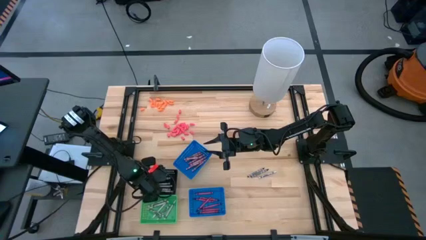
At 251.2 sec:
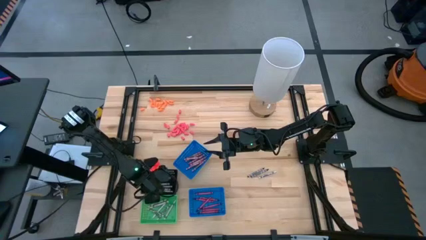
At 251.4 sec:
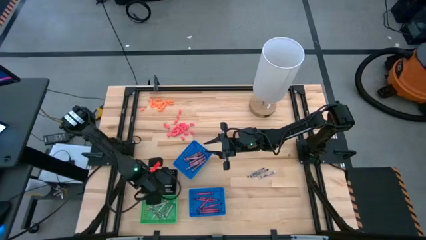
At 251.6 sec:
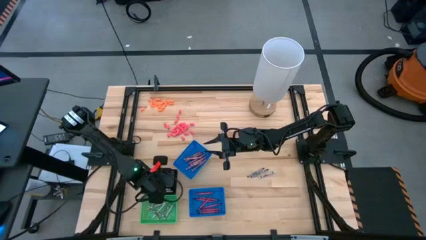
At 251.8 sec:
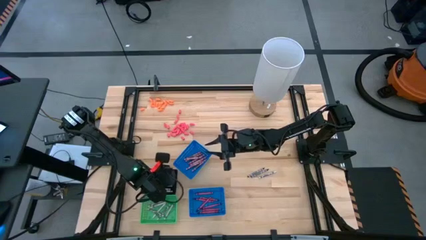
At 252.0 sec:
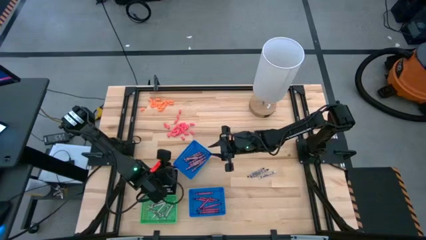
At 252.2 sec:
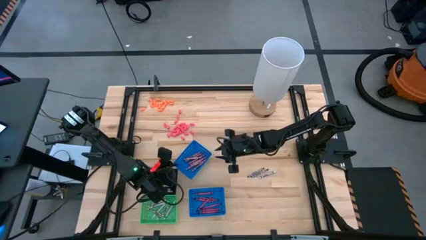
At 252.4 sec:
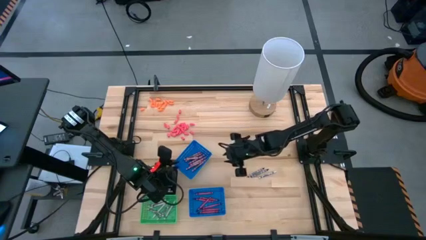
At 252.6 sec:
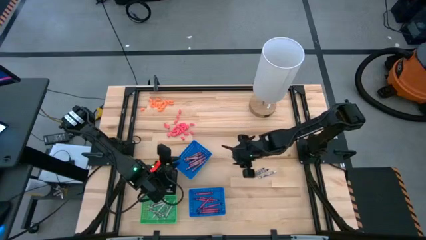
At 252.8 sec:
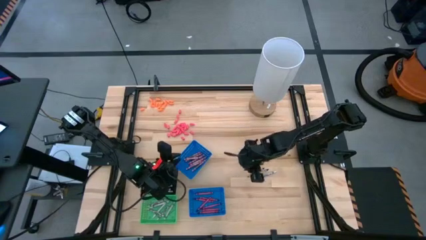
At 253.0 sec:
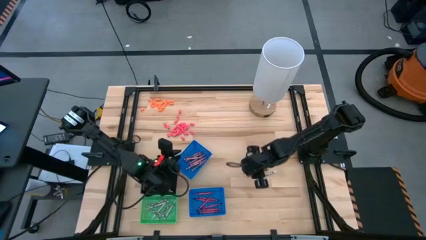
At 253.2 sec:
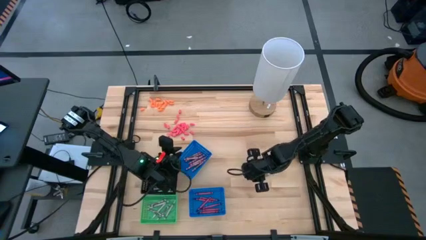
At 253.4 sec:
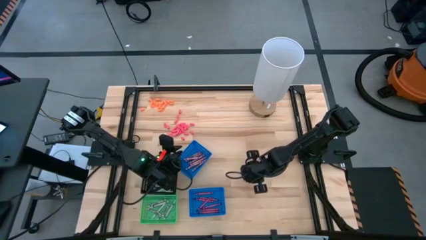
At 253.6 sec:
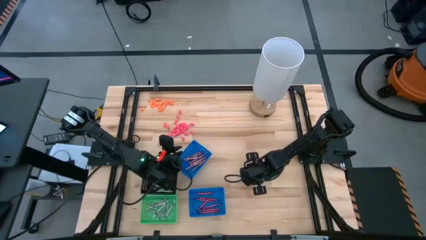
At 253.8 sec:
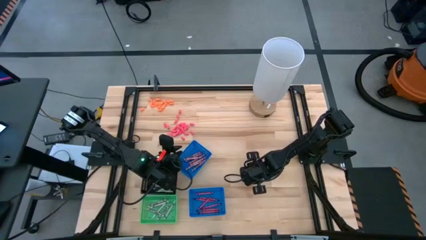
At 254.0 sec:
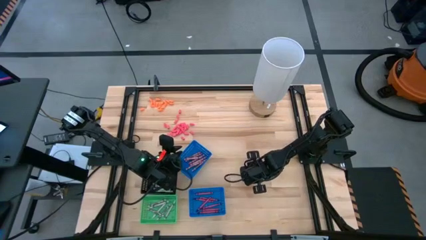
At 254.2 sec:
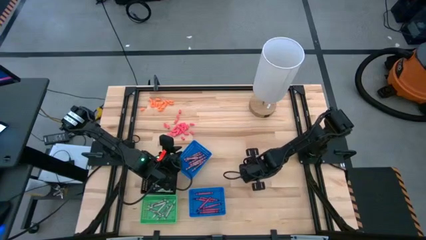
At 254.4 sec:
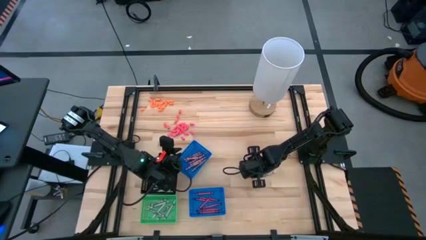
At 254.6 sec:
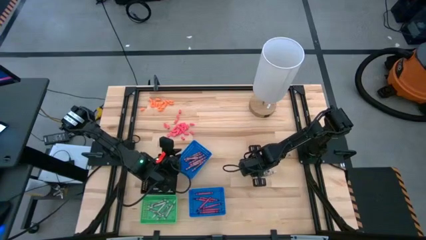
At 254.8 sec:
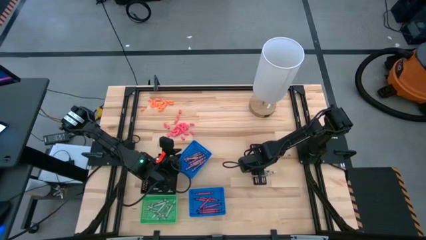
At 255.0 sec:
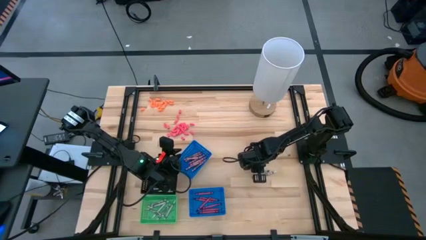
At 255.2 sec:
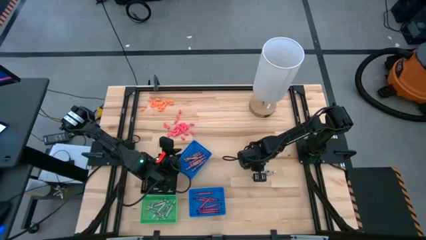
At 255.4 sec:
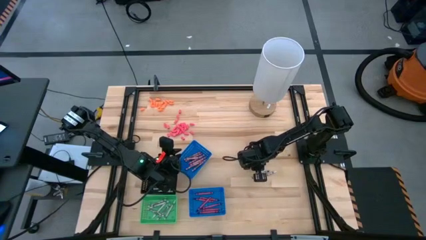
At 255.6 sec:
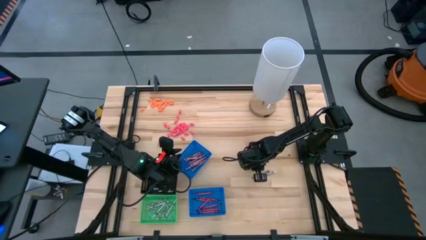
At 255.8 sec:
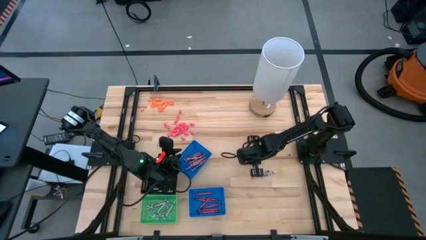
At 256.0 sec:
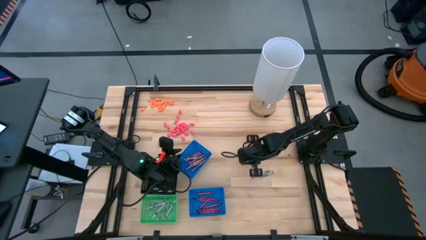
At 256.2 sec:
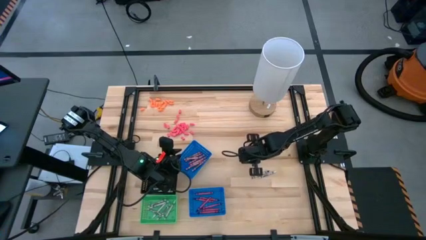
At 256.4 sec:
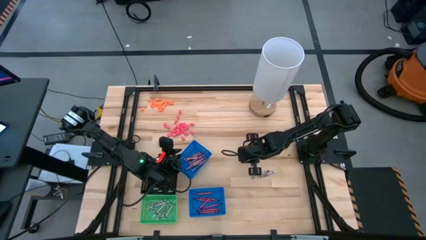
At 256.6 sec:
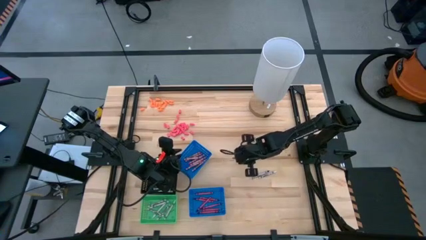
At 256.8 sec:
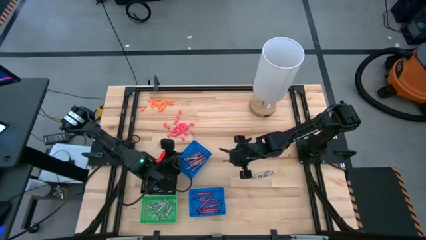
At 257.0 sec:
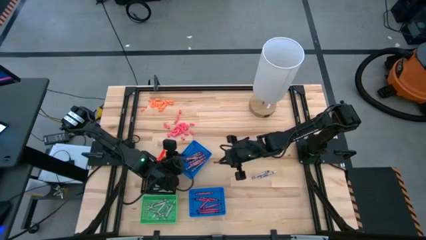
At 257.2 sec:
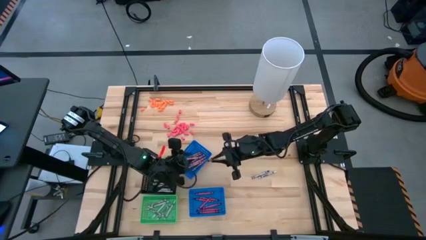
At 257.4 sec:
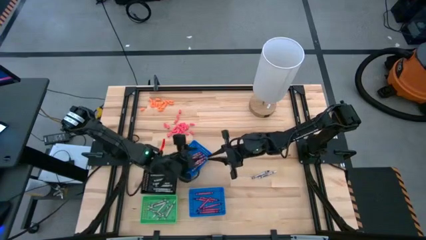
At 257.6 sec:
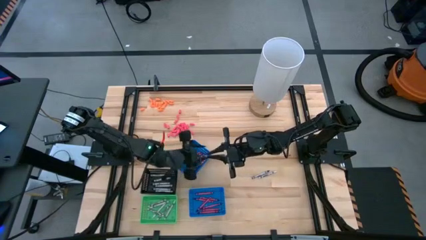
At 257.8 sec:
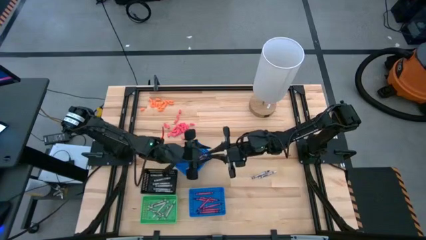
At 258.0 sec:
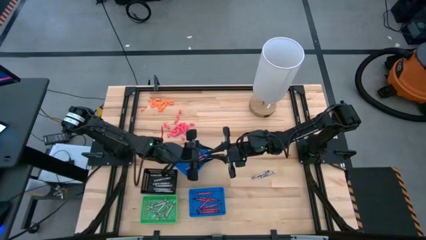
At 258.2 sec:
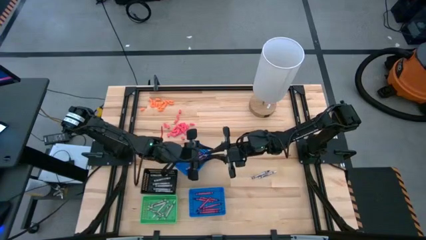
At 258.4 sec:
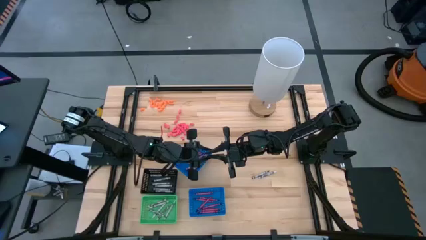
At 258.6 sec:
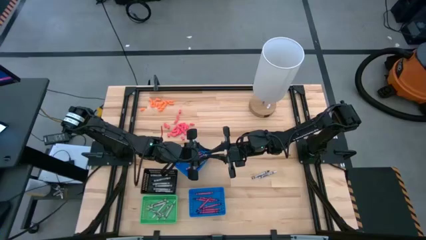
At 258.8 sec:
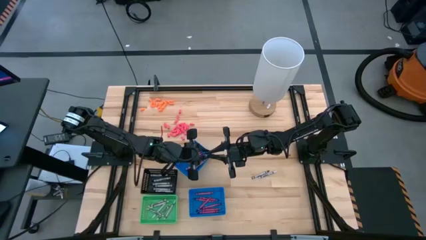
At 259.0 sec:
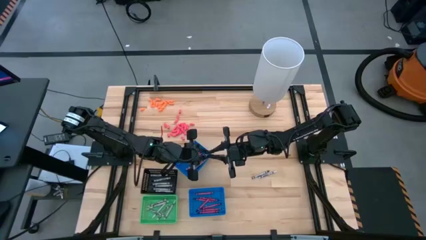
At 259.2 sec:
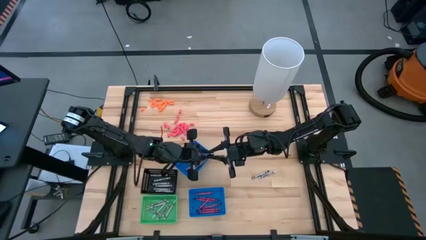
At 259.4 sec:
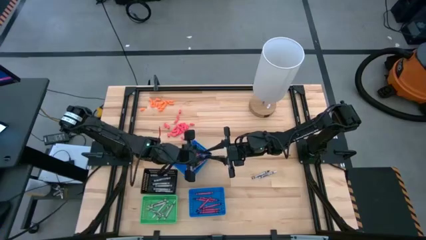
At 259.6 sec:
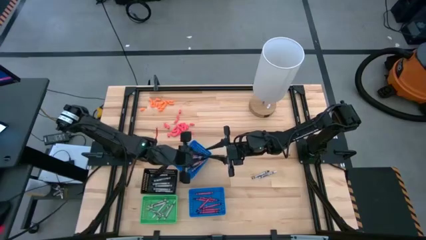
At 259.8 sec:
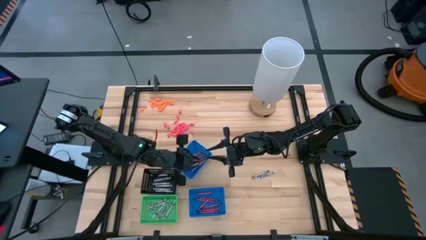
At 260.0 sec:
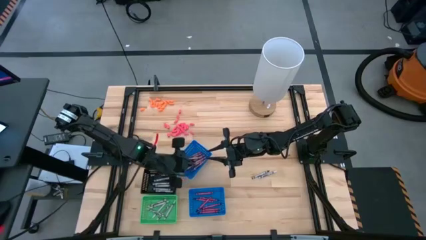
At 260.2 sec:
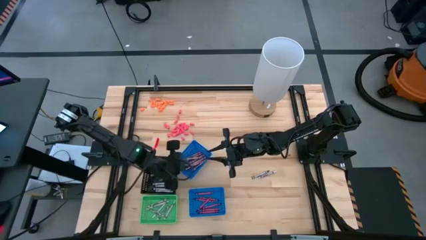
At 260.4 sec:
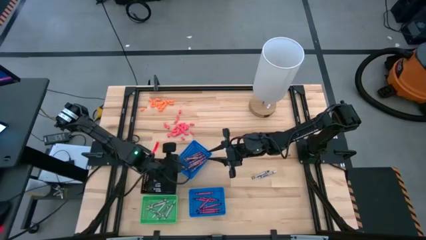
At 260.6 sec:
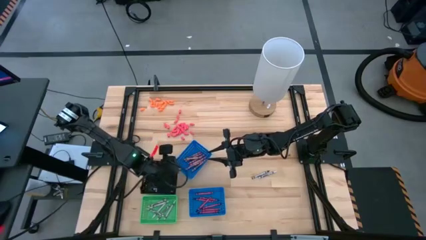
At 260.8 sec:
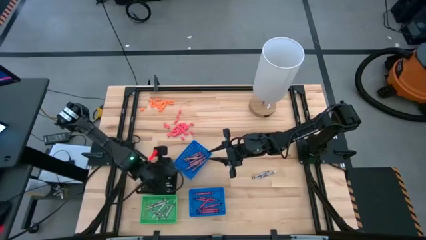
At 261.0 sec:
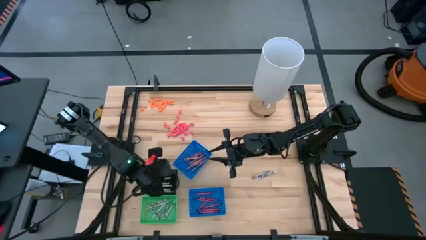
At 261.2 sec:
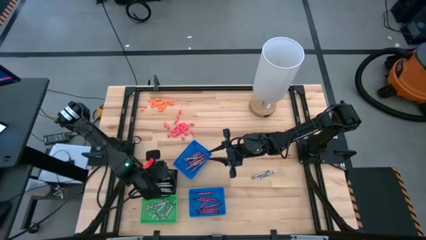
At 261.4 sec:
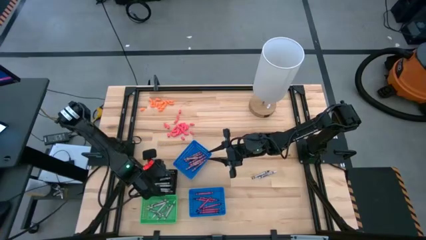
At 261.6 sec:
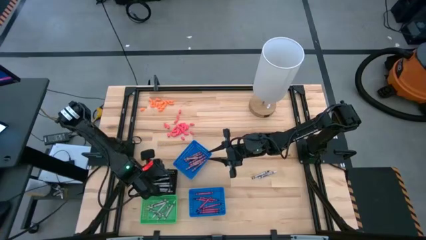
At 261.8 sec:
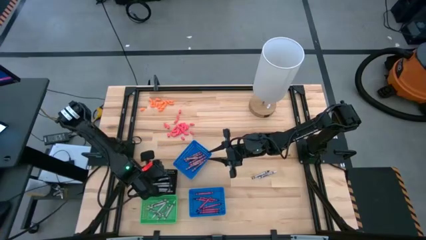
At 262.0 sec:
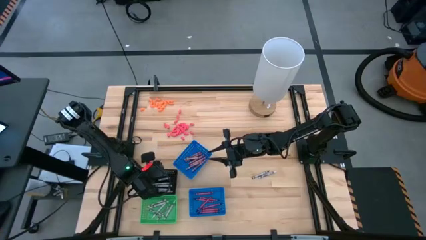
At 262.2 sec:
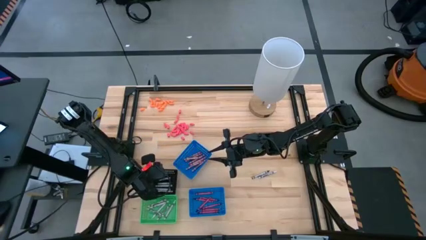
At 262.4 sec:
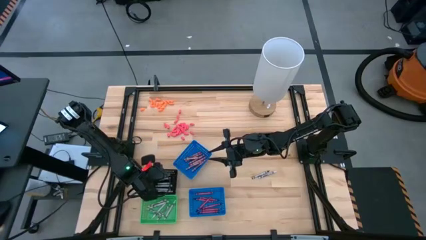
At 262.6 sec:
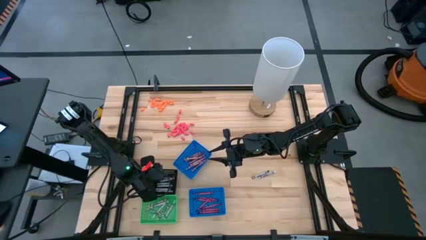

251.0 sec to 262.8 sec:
Task: Sort crayons
Put the black crayon into the black bin

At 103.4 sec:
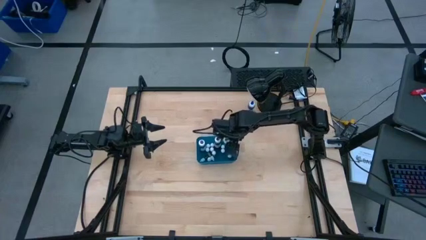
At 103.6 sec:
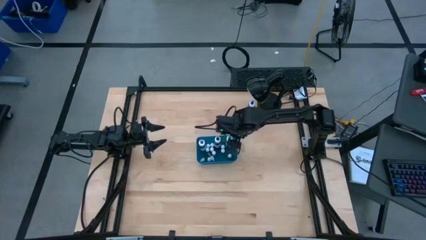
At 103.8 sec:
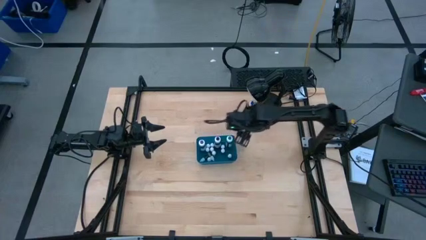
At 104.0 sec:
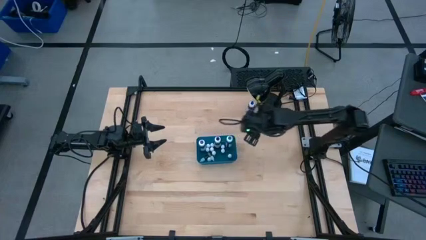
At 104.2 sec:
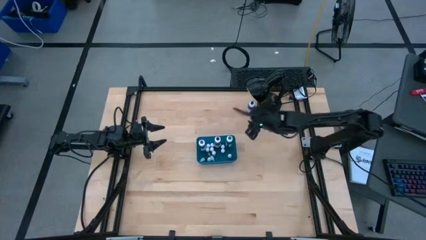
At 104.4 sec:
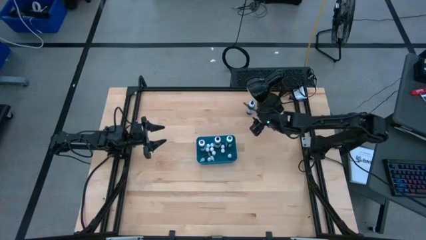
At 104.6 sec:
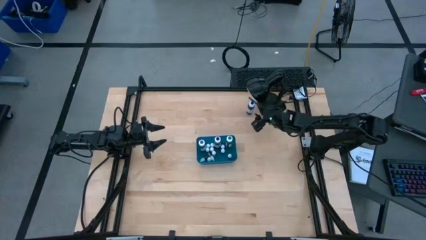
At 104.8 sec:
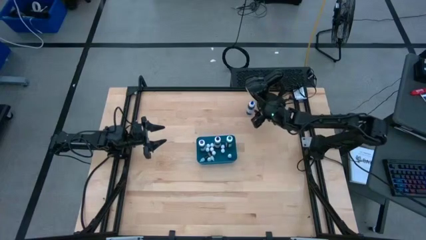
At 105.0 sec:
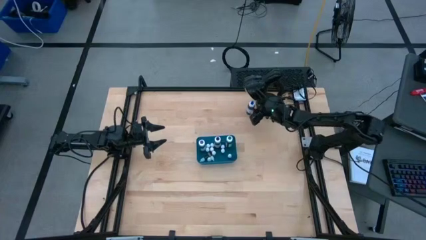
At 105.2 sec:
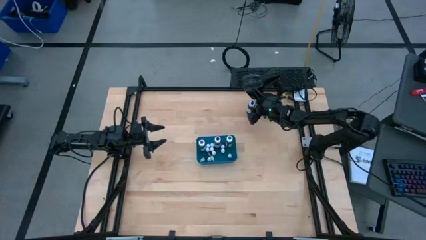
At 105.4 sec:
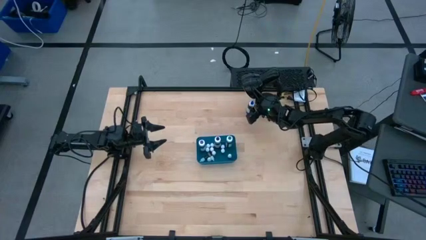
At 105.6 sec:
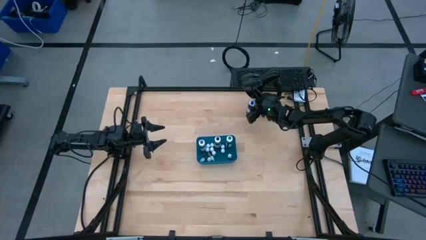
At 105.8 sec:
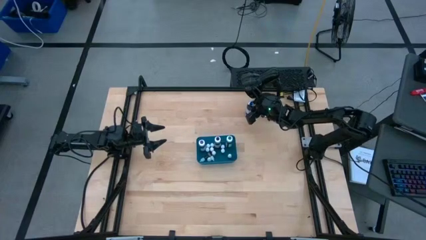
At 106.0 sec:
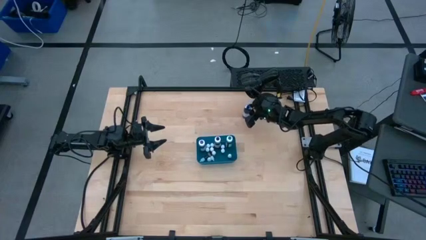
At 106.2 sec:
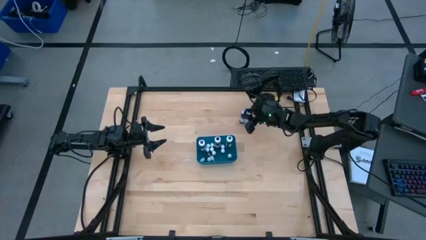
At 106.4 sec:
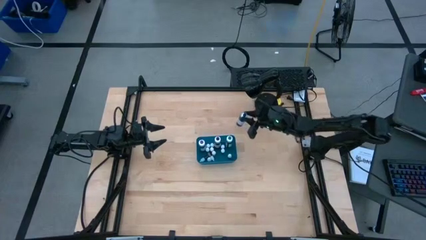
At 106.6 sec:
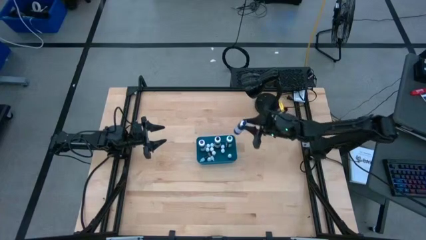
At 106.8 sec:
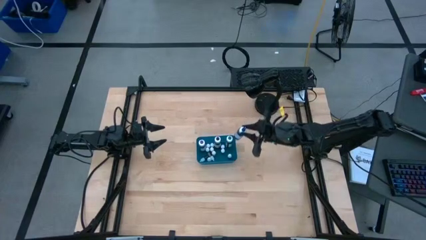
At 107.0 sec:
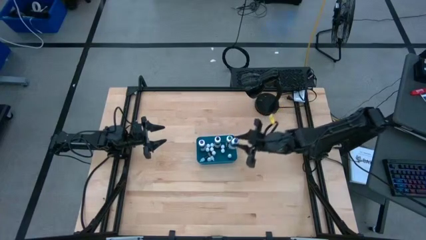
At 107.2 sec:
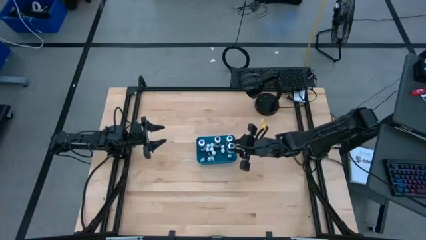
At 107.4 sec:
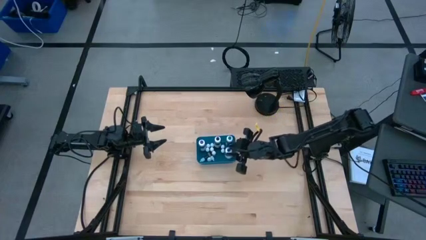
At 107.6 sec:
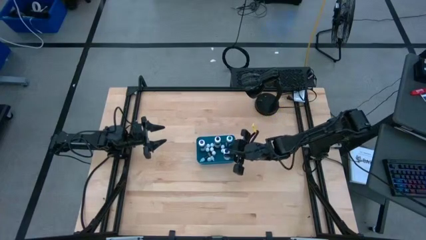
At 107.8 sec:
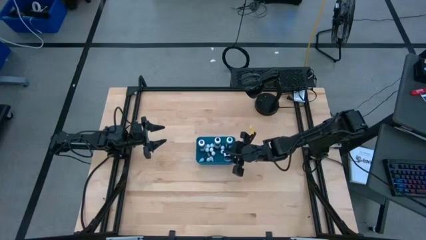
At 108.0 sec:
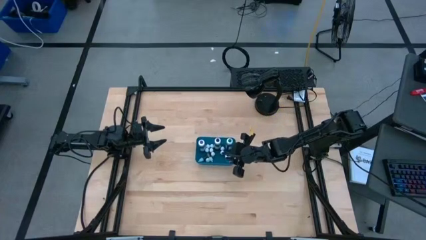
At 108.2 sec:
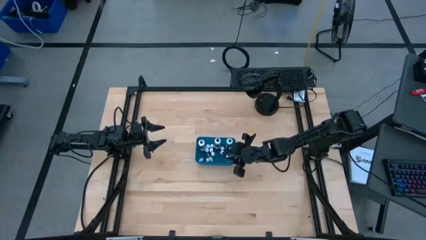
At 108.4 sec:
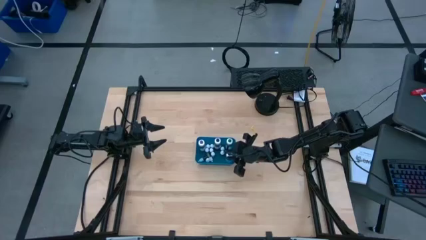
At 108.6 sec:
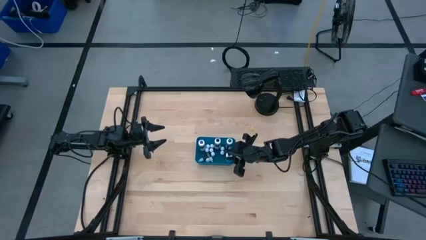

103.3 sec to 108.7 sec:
Task: Pick & Place food coloring
Put the large blue food coloring bottle into the blue bin
